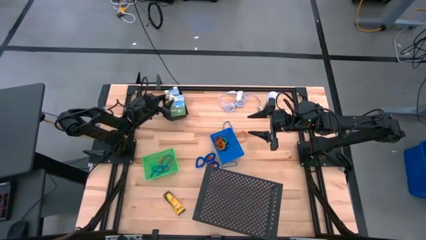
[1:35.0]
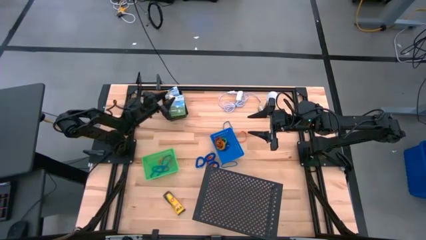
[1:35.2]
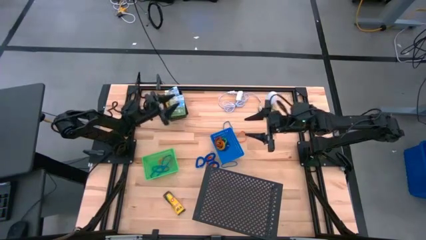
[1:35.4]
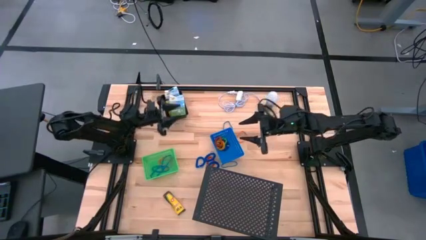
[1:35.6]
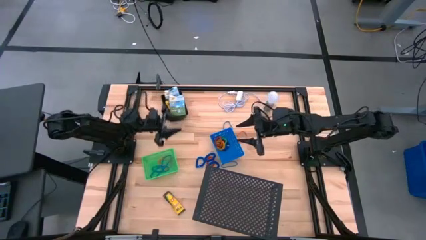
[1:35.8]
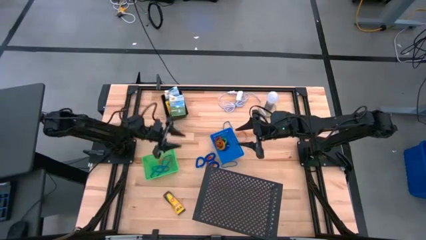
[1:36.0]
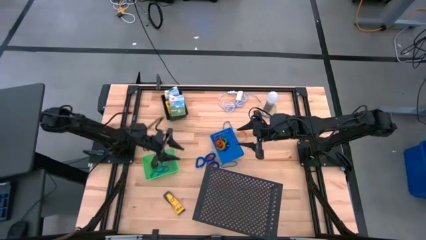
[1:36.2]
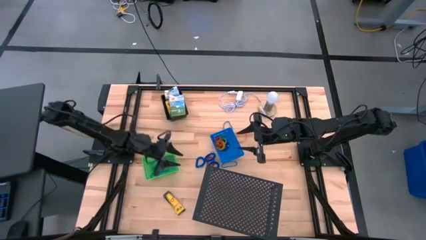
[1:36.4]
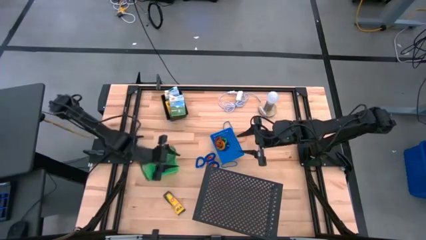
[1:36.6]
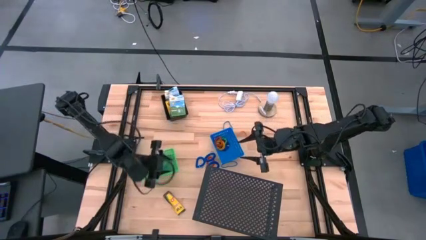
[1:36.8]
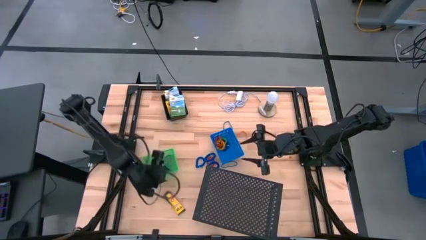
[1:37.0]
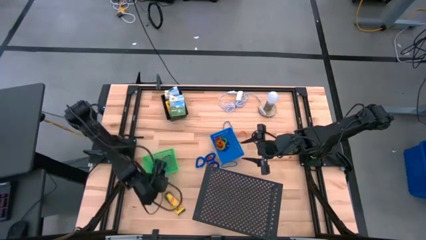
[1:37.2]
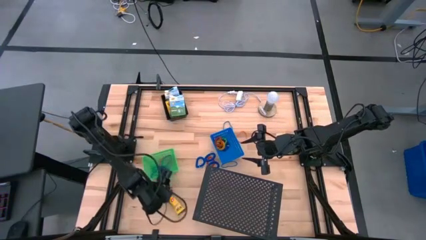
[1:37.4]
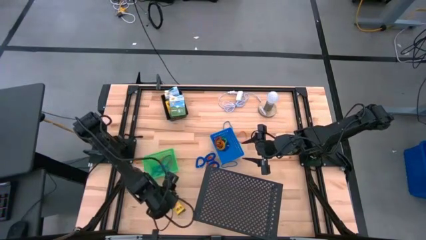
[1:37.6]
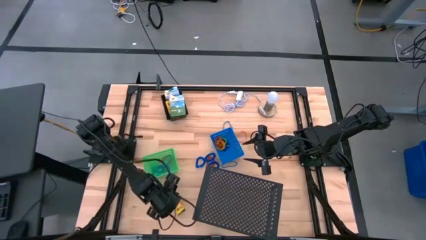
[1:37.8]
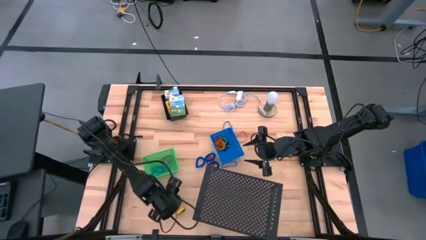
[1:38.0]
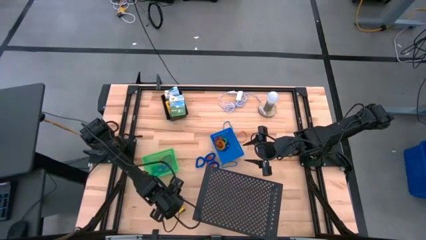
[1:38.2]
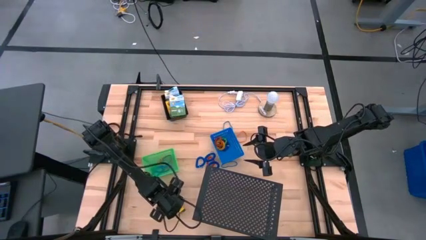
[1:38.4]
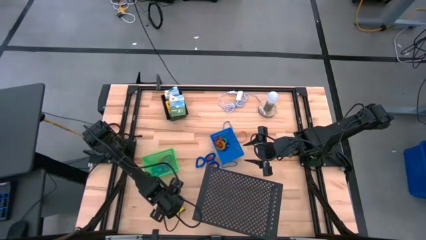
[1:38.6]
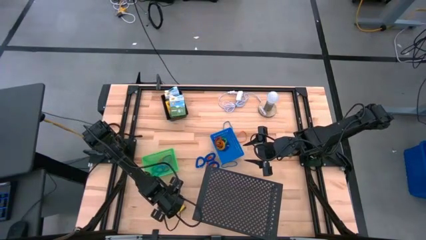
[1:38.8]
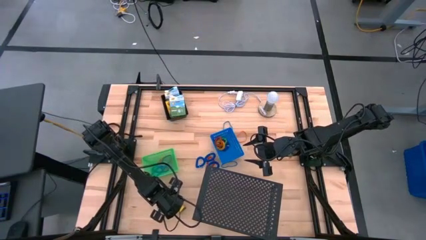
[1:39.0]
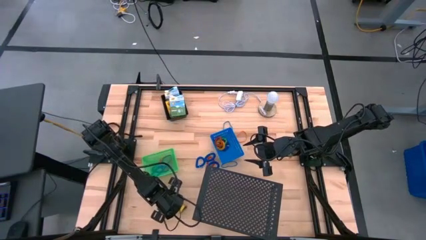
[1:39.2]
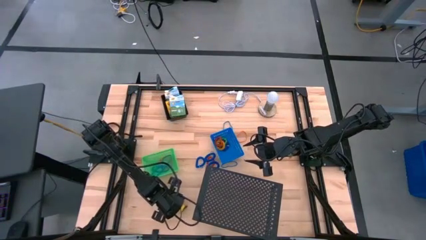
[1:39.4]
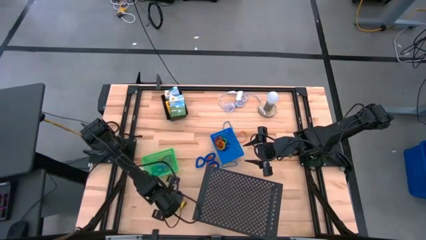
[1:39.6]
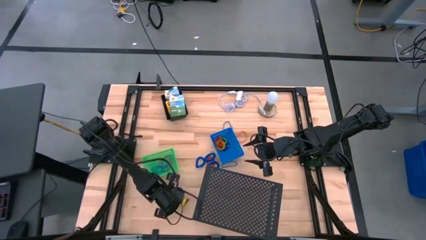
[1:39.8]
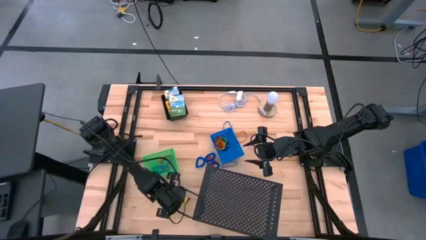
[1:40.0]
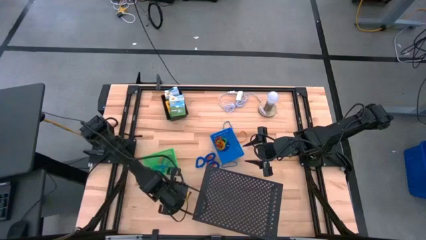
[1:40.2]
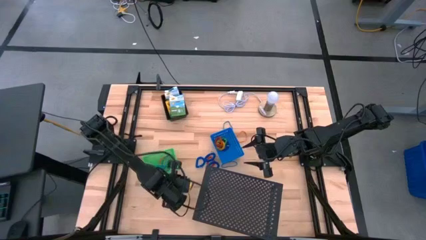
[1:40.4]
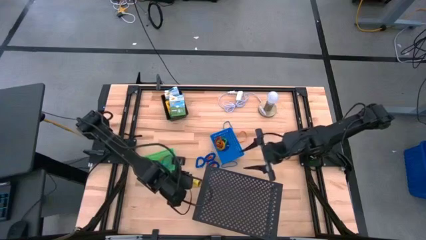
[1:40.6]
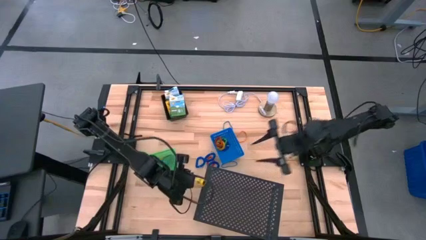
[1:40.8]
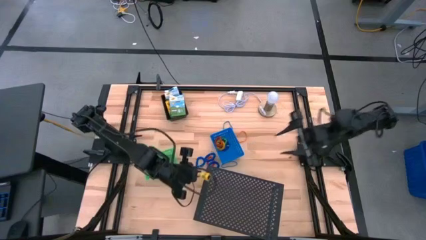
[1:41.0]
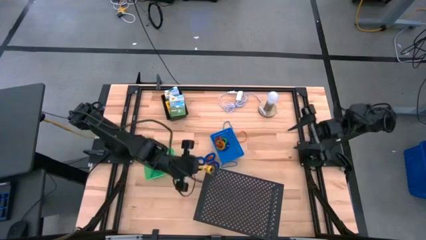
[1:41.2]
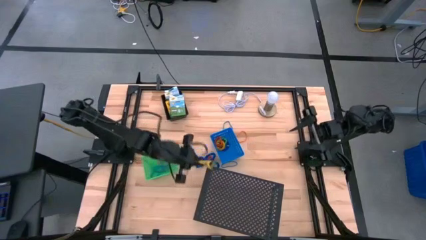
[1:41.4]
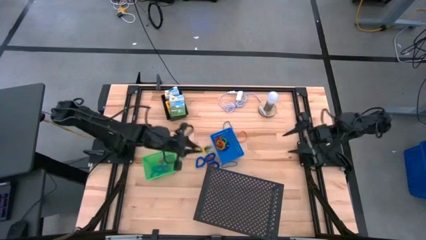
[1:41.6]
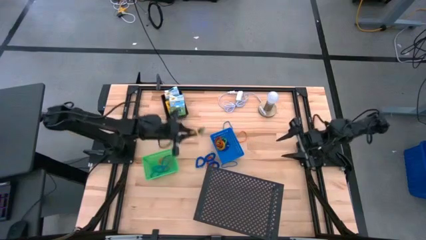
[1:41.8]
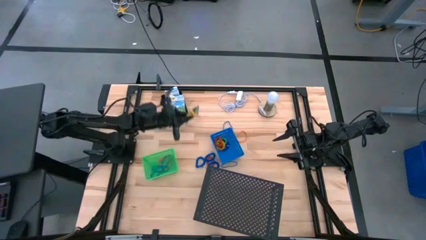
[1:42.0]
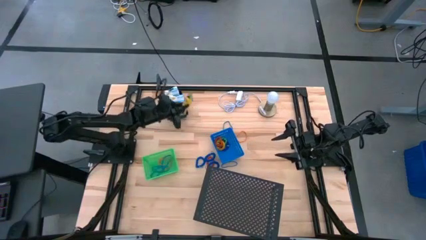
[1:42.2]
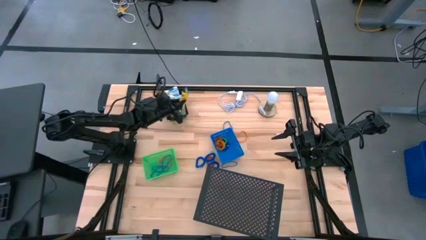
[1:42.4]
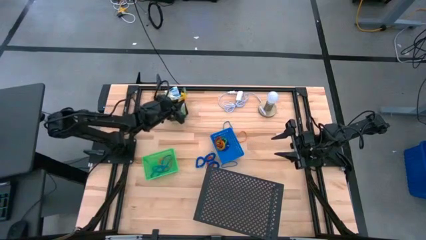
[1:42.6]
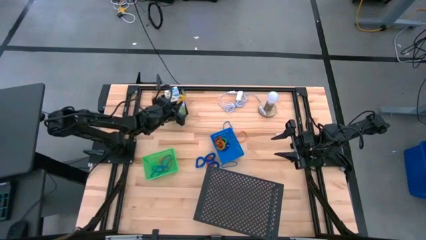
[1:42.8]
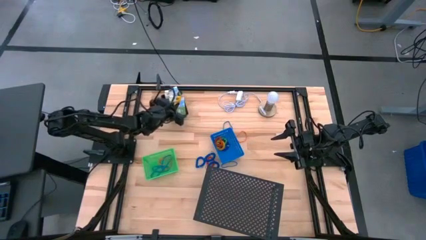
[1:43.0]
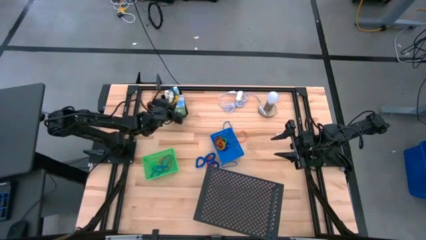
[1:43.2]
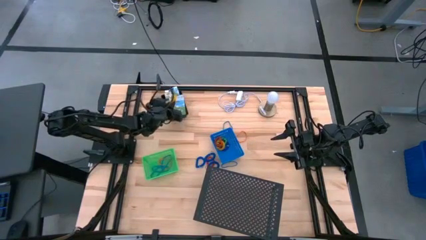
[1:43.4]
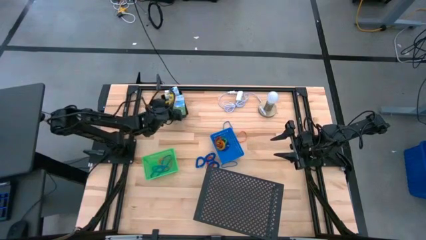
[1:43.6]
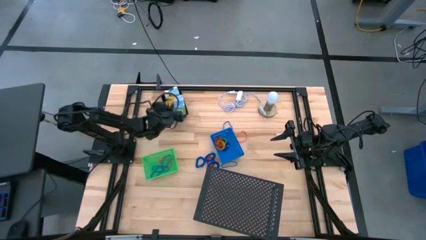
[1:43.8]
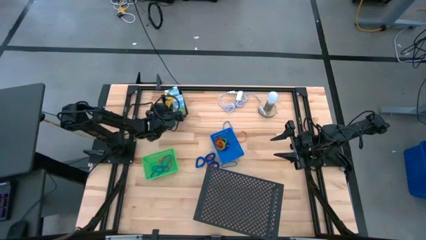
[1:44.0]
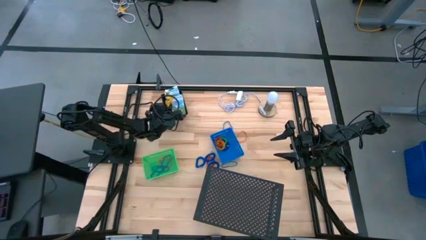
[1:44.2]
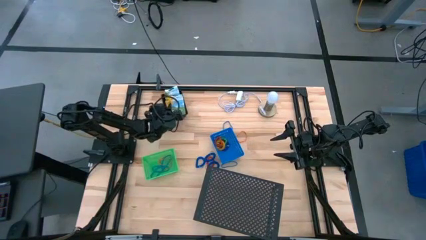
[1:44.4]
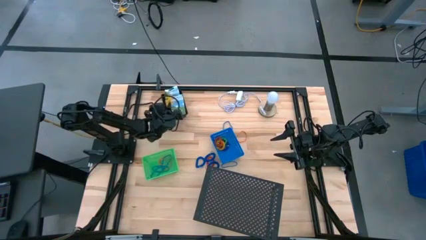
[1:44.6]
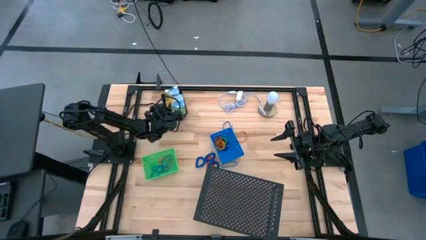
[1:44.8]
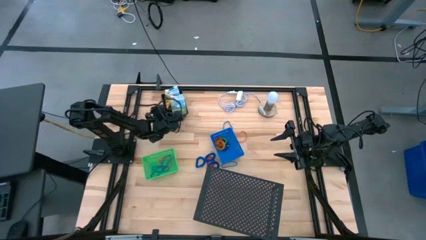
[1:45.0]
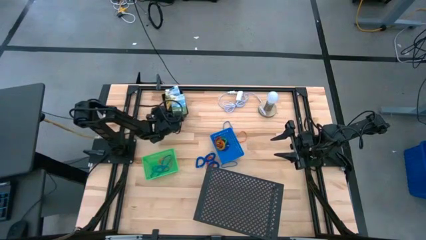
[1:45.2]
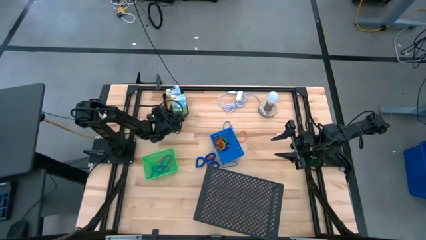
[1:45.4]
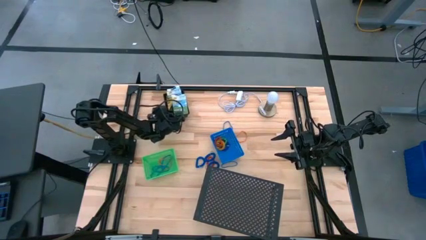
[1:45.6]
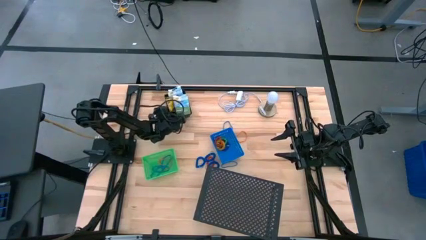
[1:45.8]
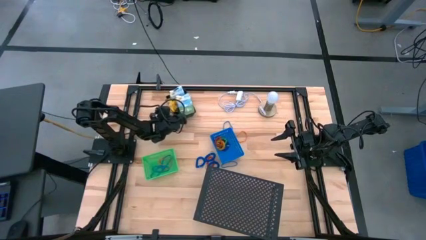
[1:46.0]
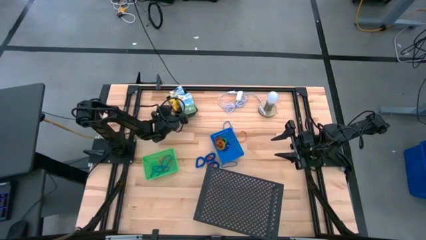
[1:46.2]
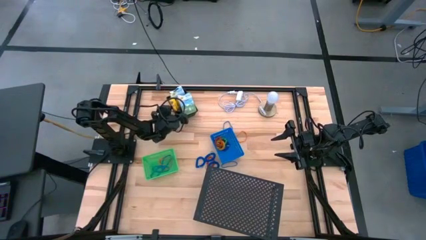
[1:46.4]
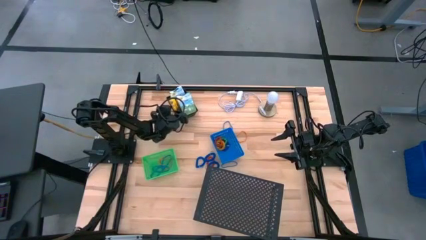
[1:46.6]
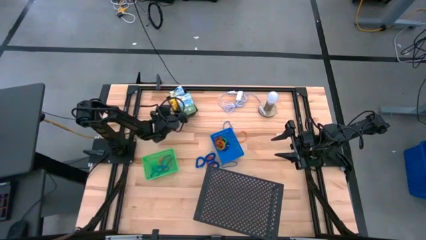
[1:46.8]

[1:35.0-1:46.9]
Task: Pick & Place Office Desk Supplies
Put the crayon box into the black bin

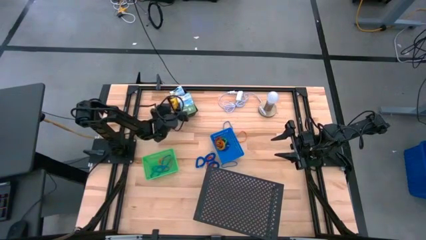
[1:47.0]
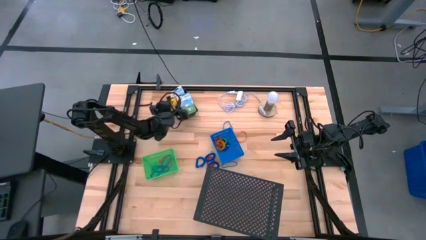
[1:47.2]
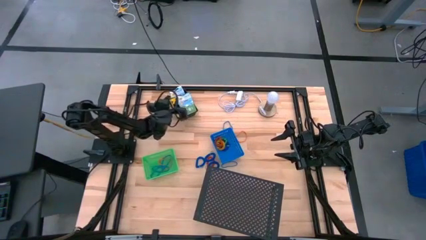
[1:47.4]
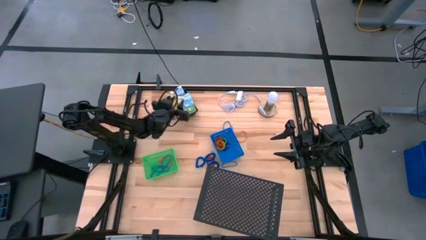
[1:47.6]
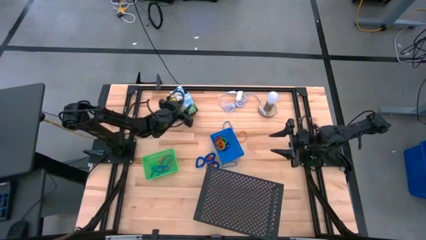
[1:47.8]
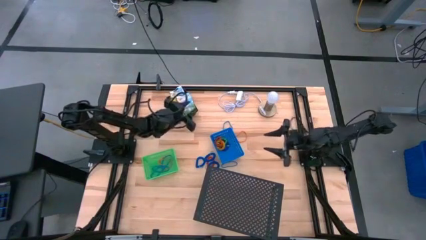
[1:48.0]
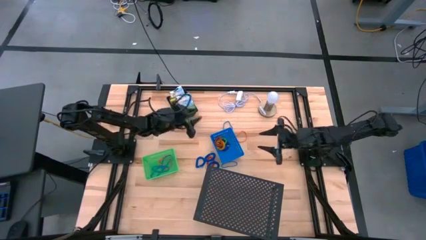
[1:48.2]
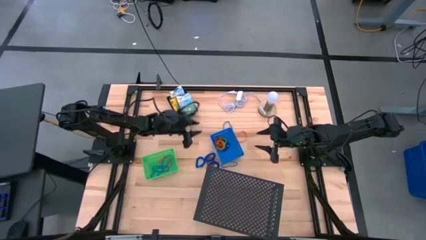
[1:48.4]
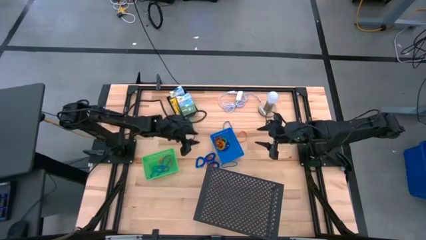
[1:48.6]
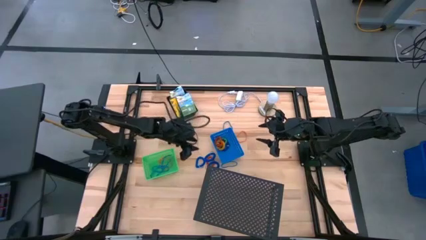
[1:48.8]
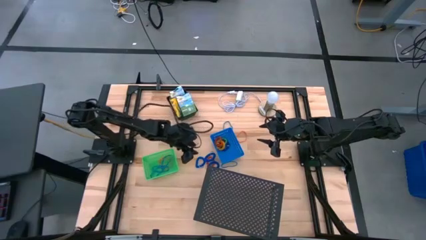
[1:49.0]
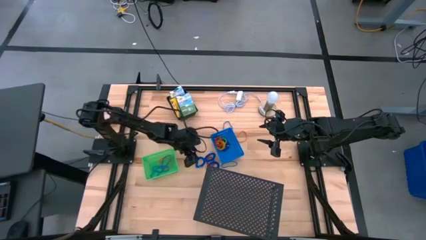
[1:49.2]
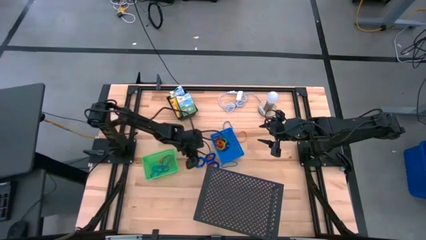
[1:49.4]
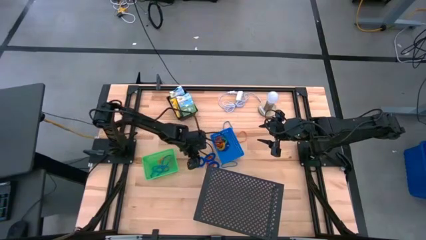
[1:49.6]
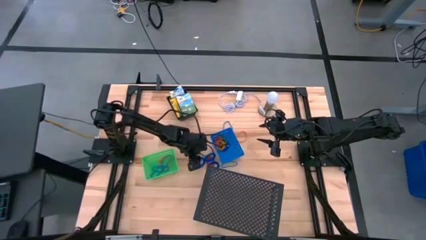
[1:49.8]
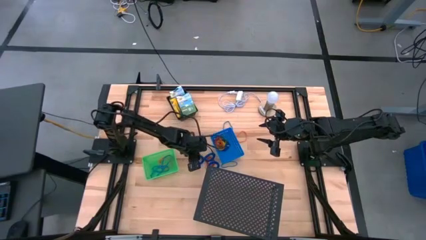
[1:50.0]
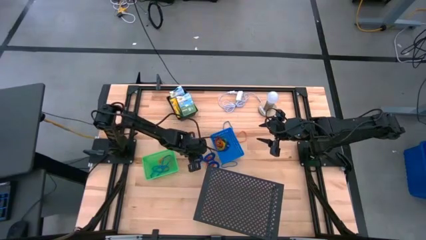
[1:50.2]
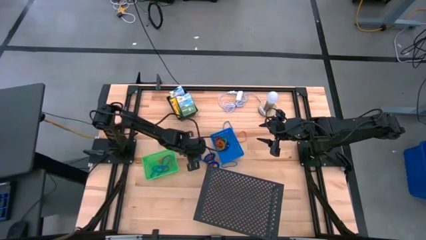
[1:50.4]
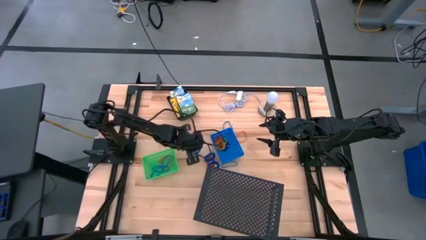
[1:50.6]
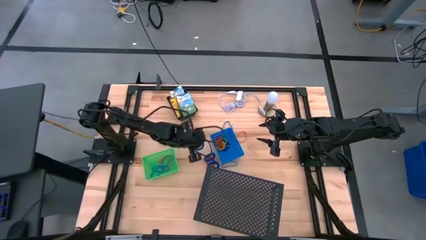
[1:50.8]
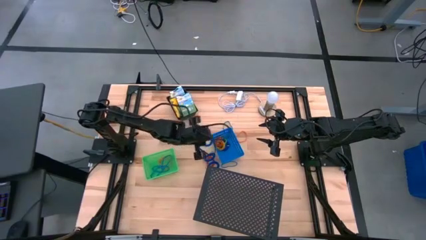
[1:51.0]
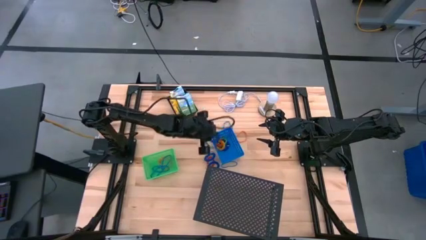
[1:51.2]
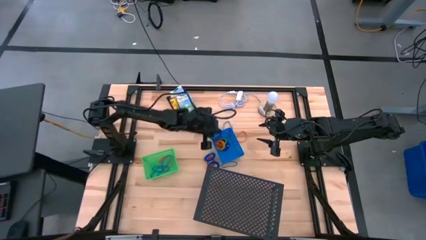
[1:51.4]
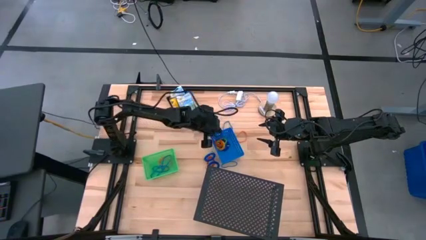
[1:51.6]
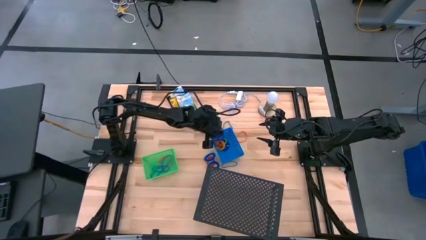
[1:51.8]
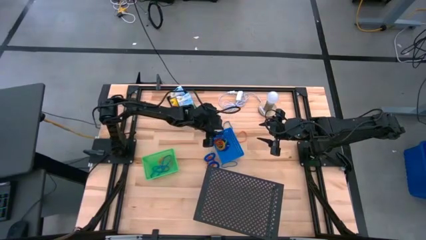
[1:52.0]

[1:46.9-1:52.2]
Put the top blue key band into the blue bin
